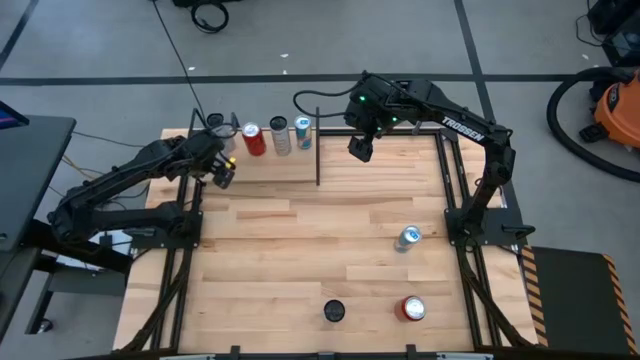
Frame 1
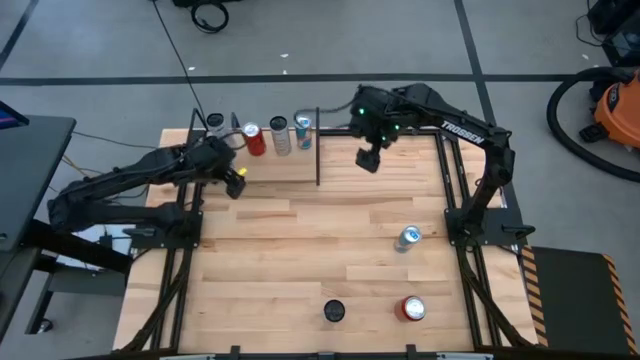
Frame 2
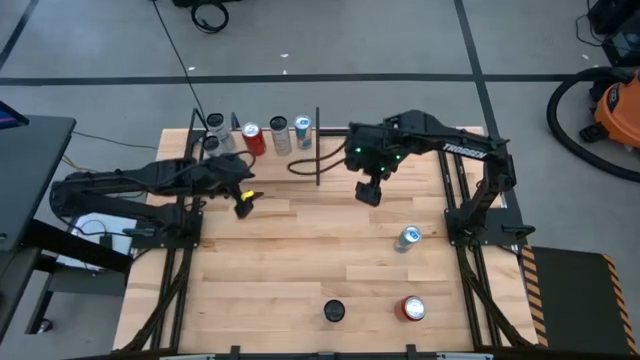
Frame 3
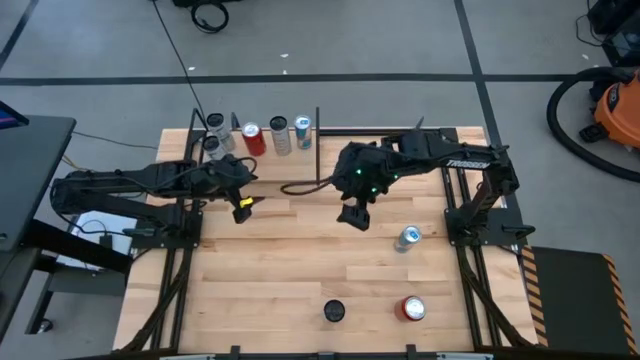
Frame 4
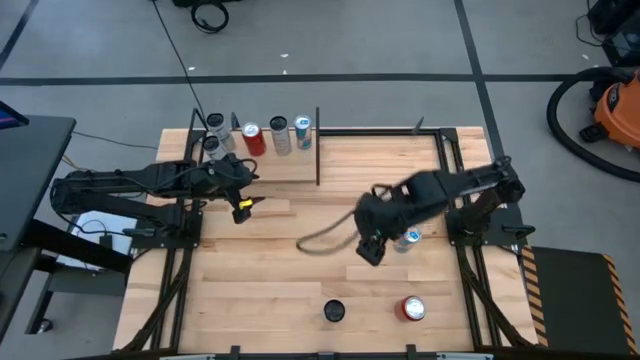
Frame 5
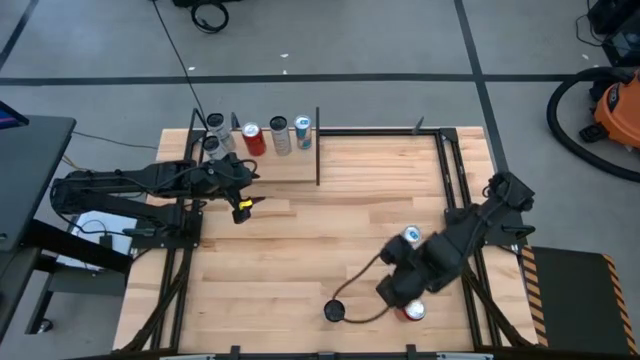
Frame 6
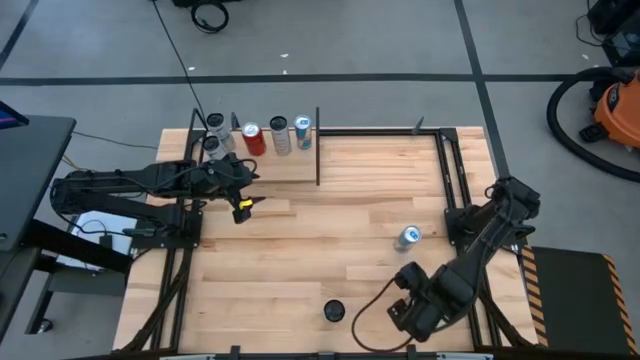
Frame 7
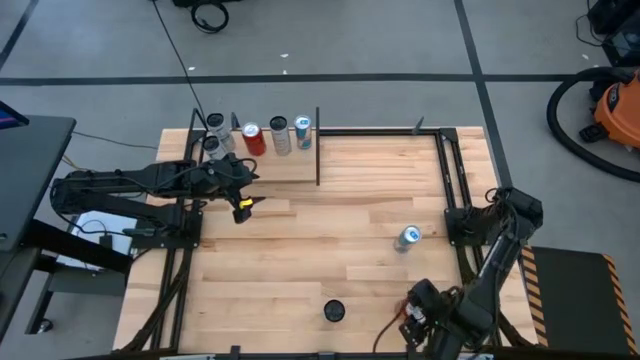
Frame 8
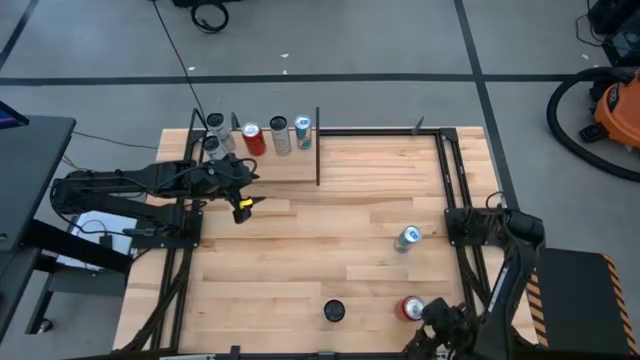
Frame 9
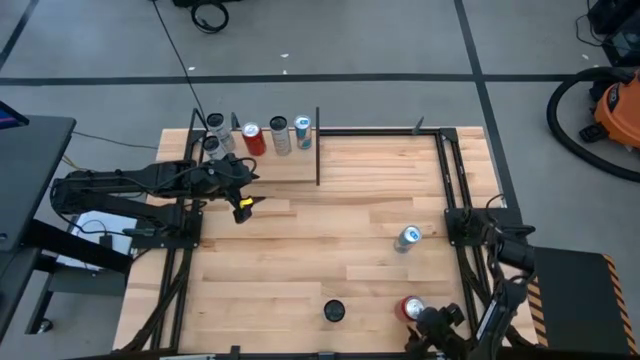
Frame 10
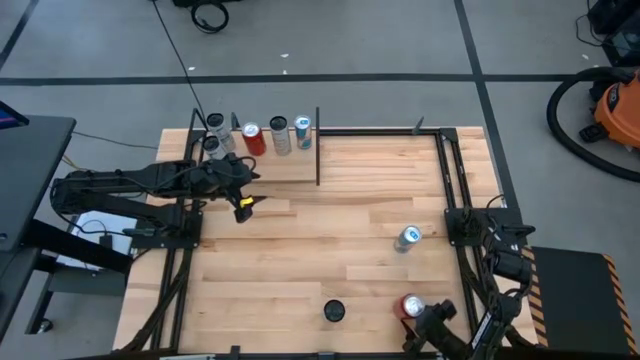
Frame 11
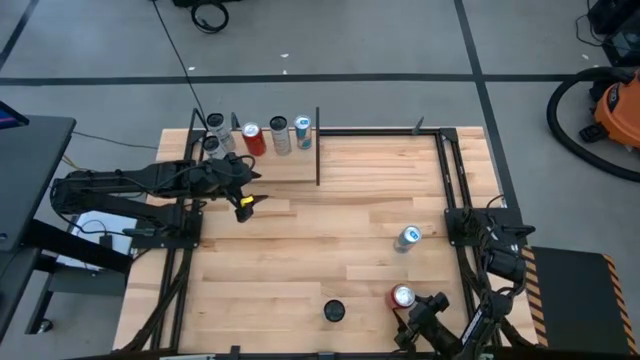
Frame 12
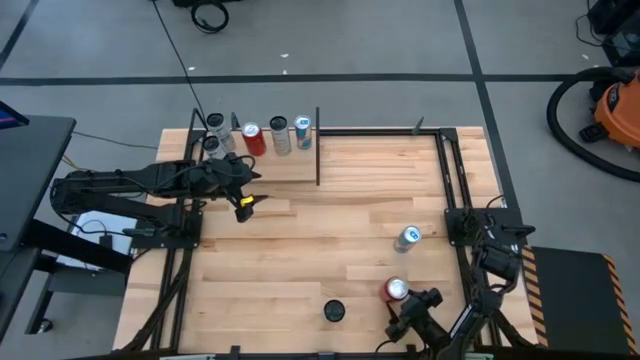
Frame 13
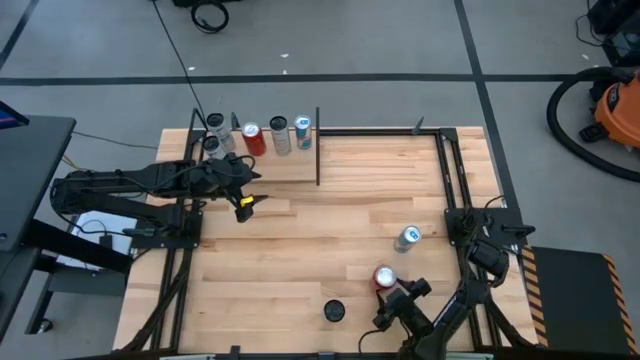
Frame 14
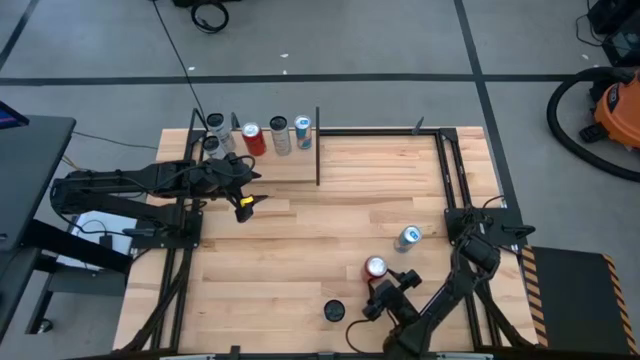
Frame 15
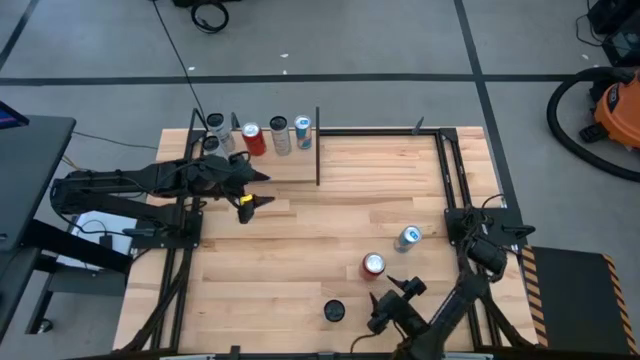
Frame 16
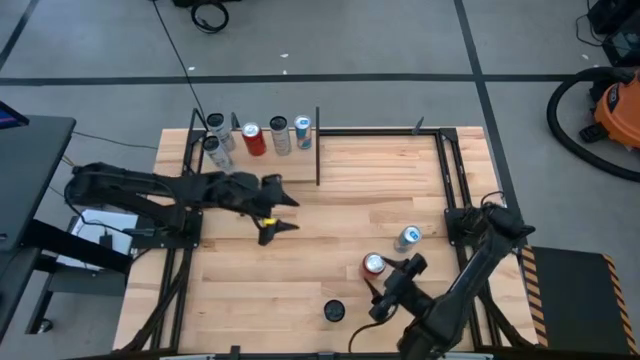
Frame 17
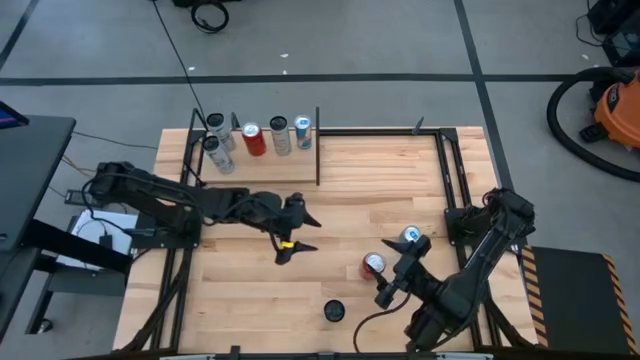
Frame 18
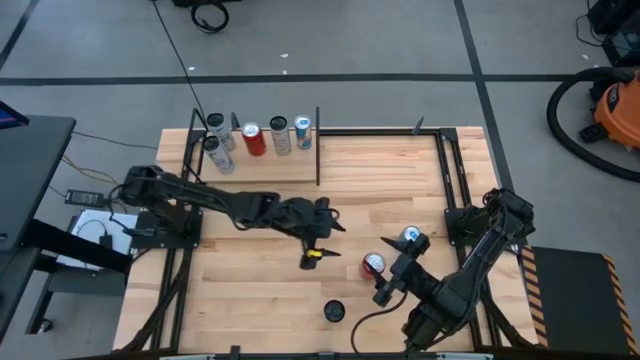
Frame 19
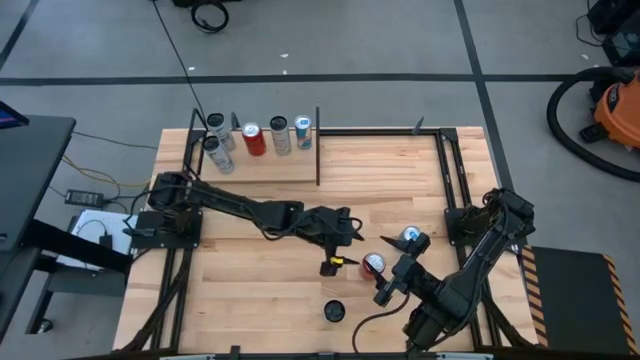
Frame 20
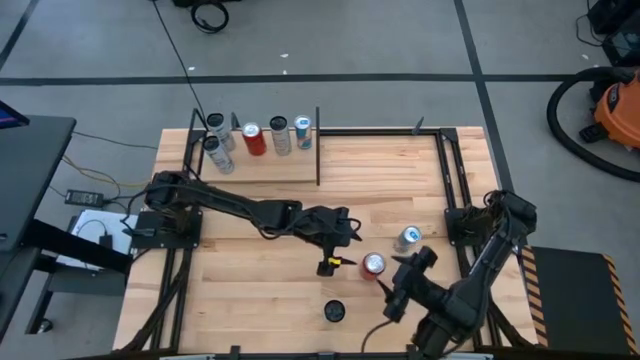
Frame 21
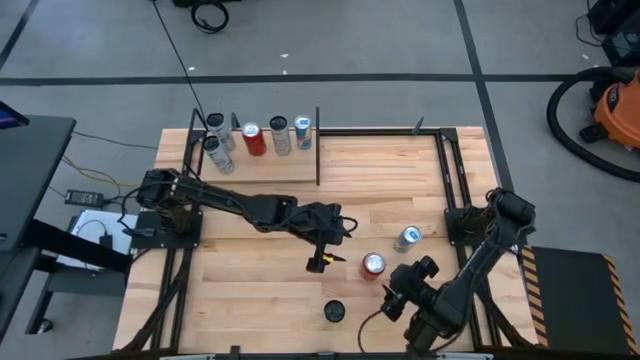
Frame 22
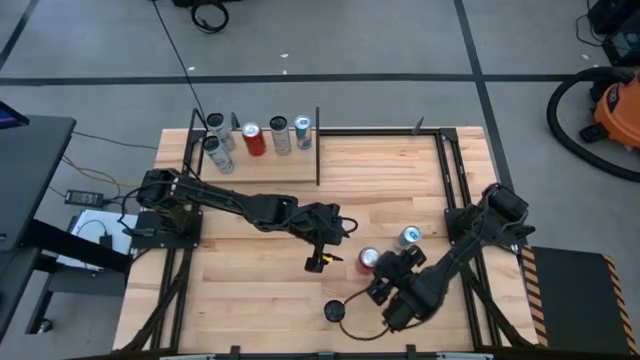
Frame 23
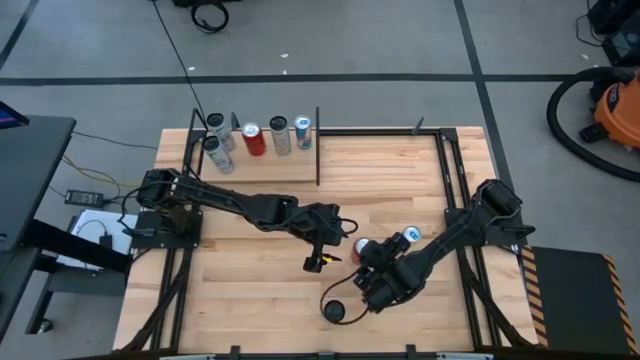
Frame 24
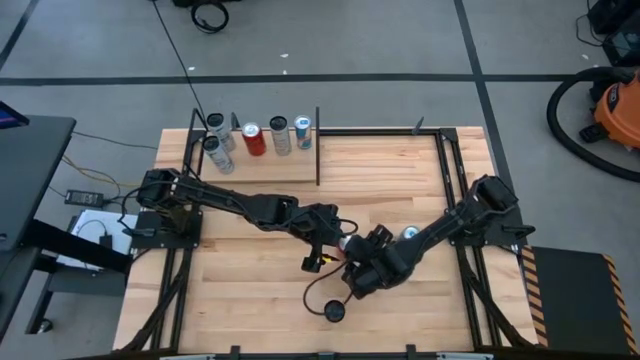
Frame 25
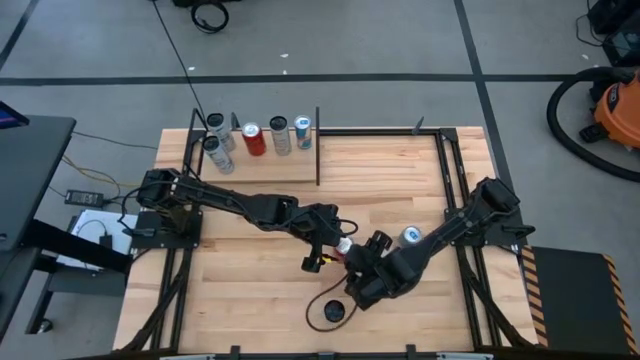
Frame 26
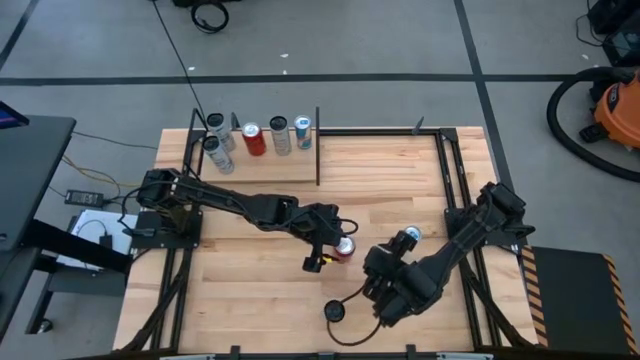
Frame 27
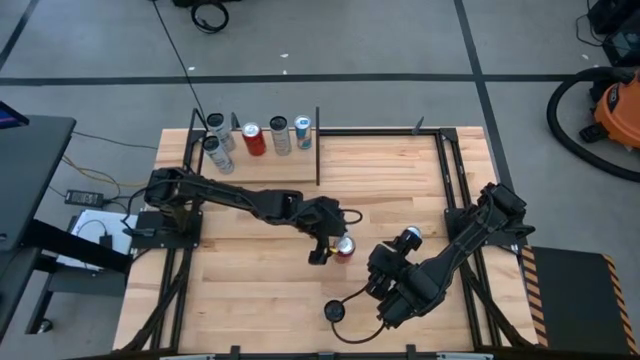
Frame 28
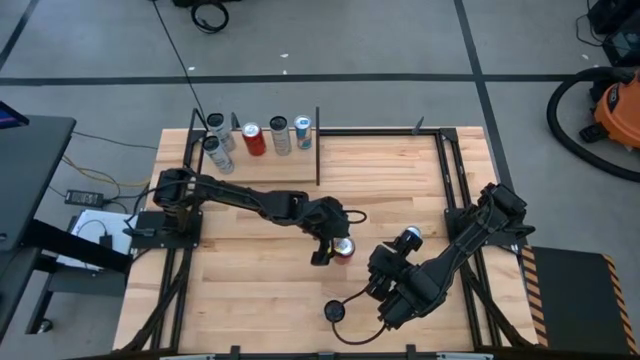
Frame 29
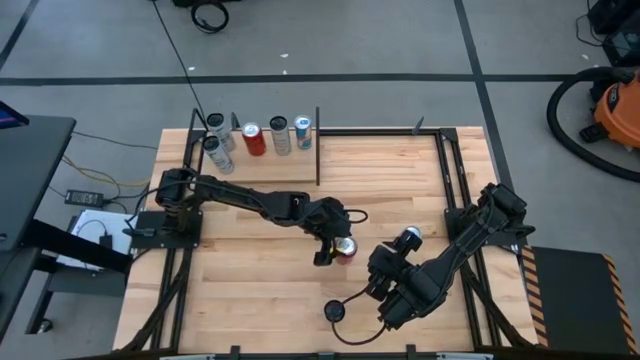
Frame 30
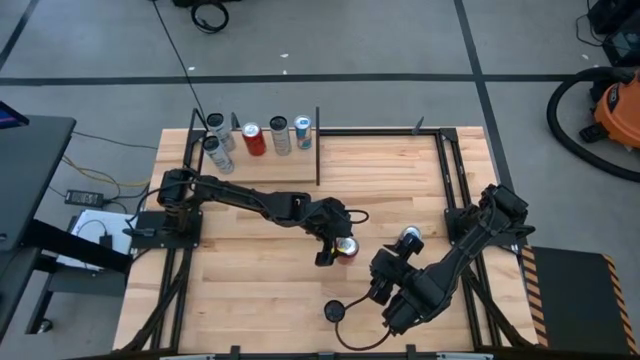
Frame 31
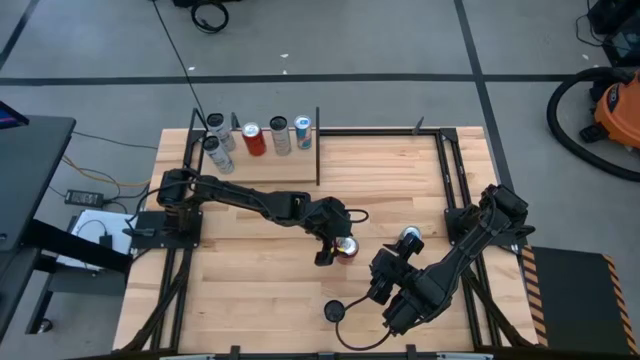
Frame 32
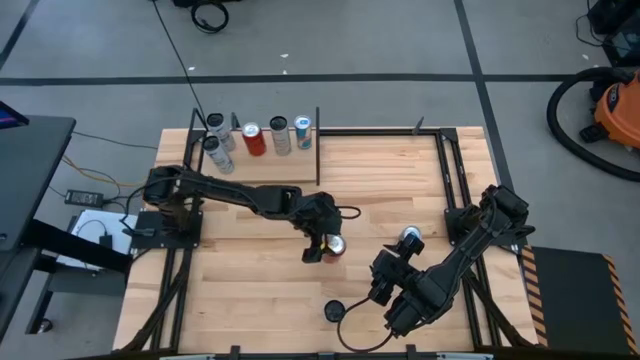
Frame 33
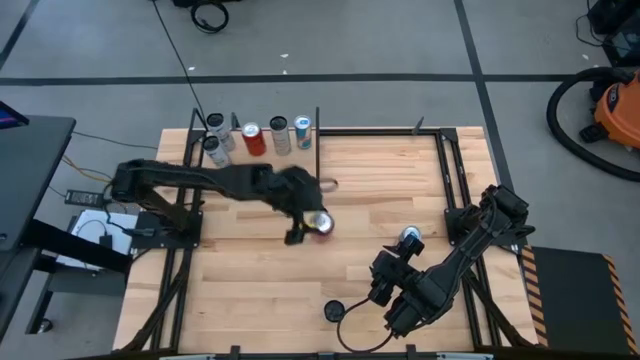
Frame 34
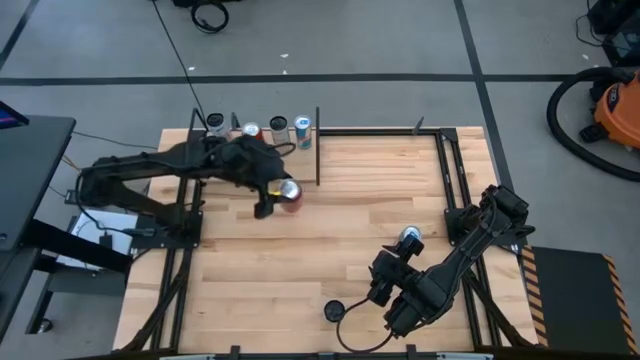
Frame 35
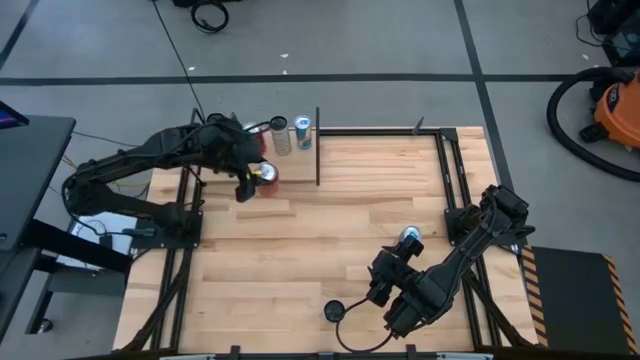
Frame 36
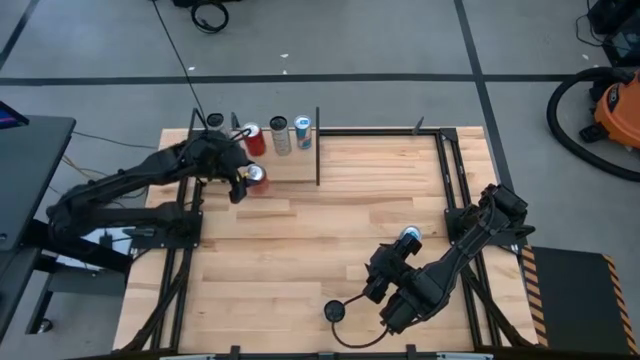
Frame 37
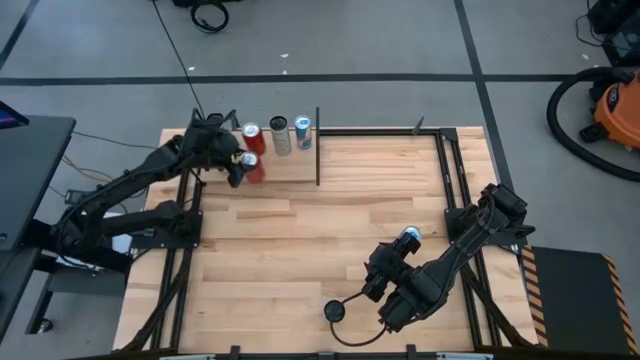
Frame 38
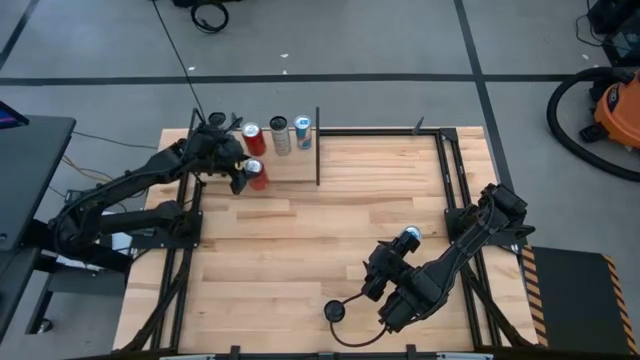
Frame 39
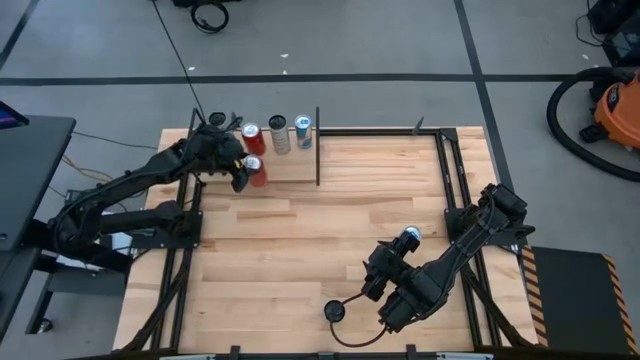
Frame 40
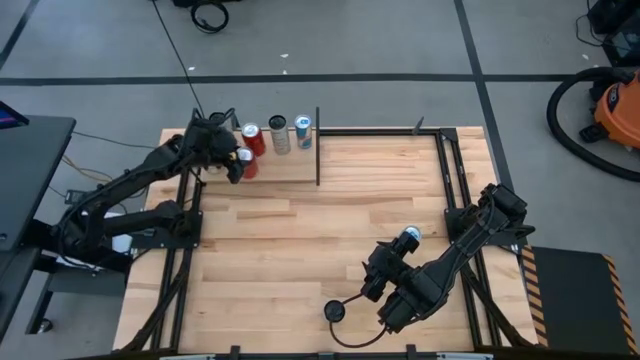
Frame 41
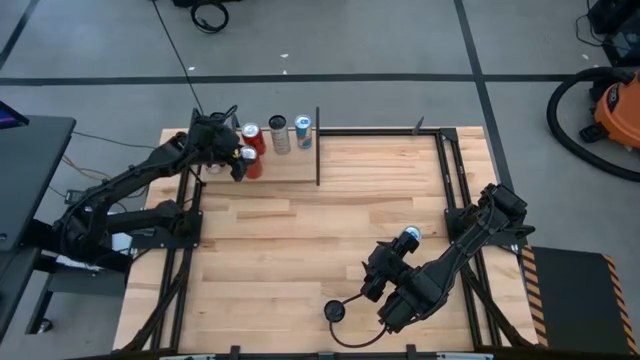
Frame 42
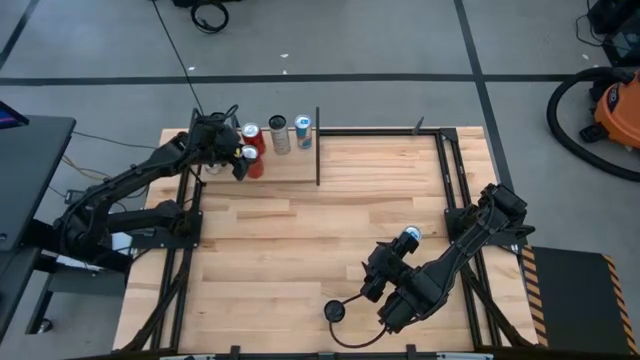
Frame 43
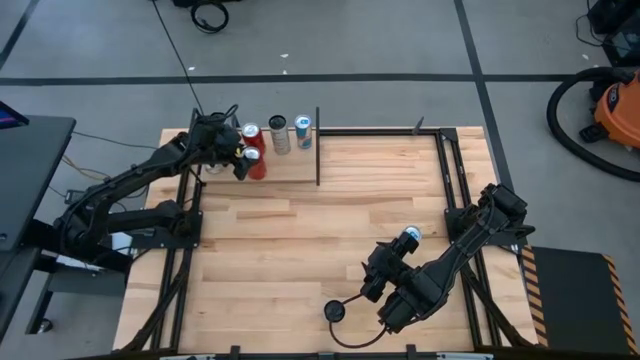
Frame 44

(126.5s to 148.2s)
Task: Place canned beverage on shelf
Put the red soda can on the shelf aligned with the other red soda can
